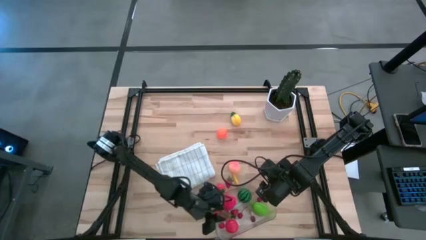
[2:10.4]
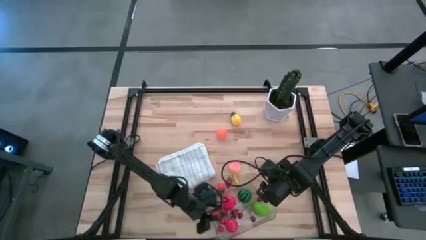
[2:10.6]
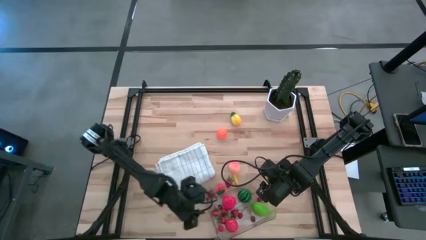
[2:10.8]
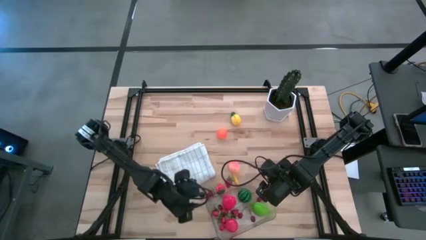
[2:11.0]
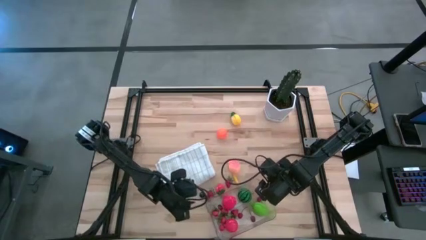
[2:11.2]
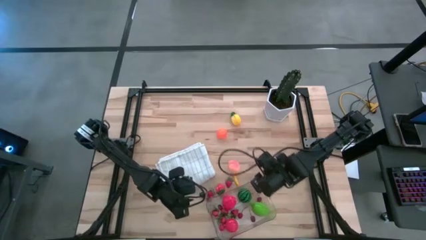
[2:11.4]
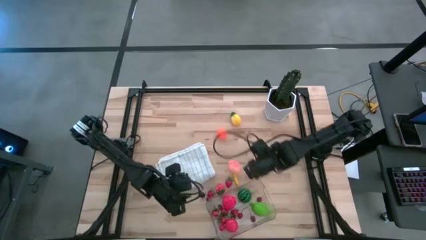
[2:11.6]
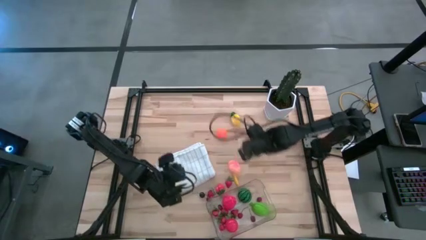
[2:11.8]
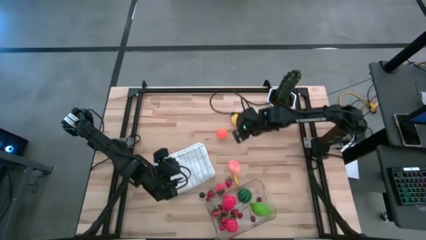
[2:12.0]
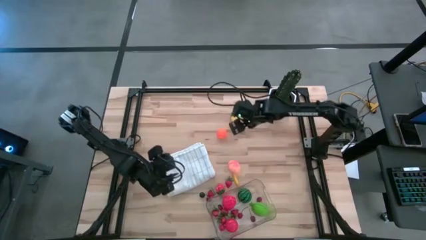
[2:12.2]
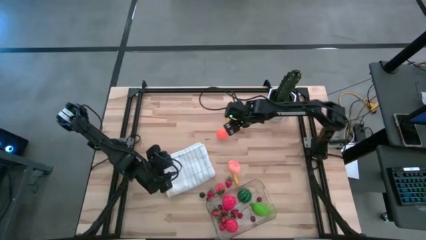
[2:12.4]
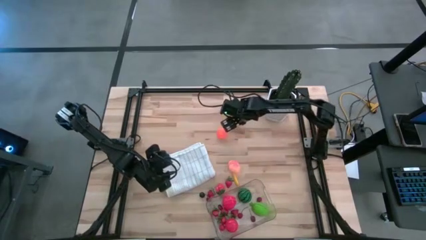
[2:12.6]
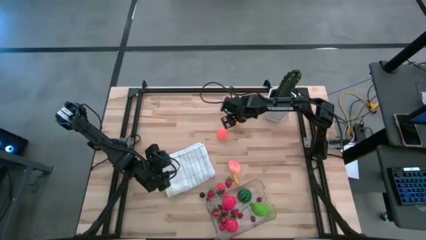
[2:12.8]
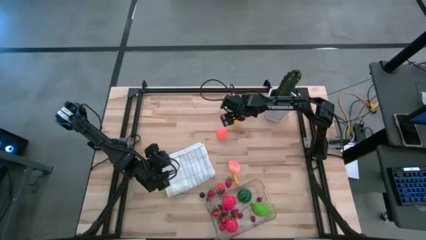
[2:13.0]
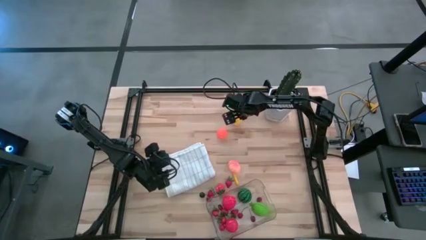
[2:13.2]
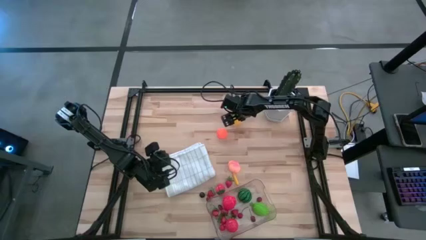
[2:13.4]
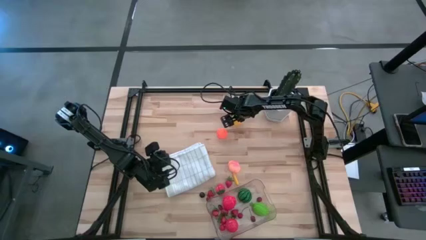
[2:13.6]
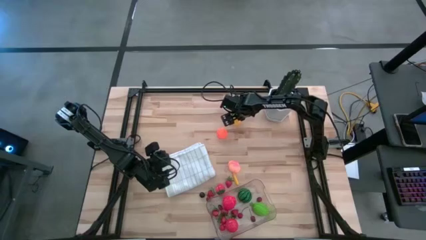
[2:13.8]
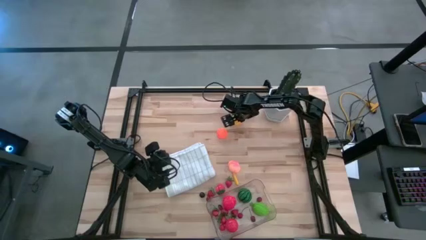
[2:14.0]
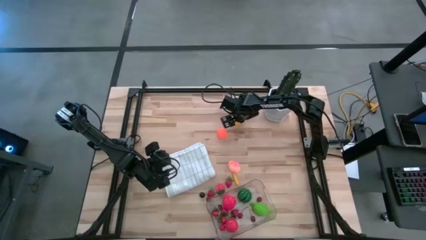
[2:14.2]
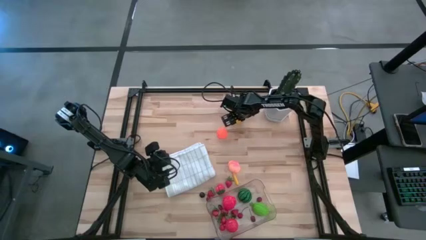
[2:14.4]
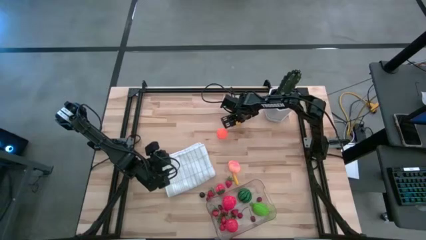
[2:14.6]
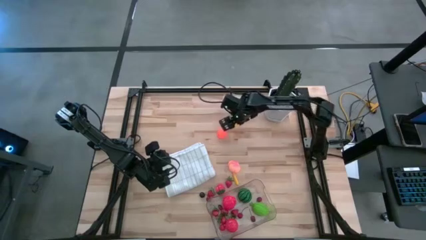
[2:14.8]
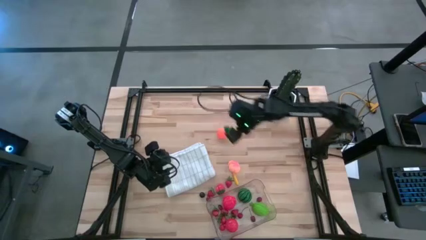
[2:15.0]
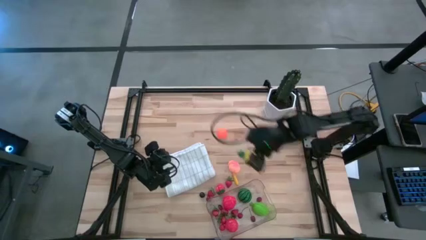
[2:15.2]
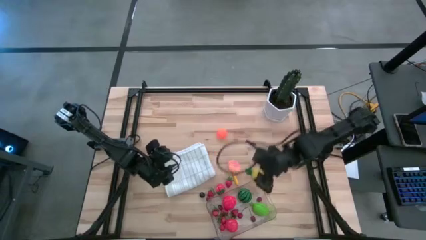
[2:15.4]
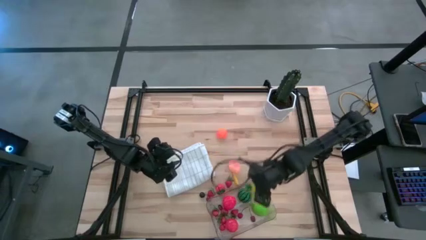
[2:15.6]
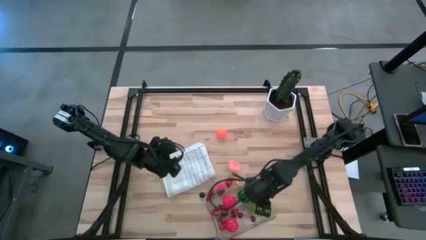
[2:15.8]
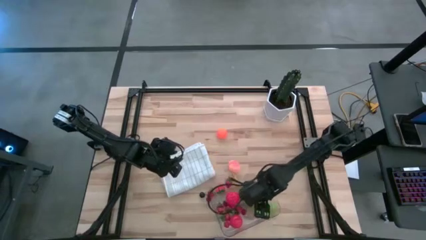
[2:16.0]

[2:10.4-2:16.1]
Task: Pick and placing Produce into tupperware
Put the pineapple into the transparent bin

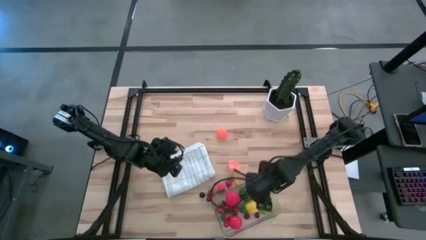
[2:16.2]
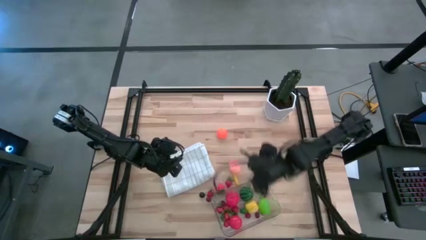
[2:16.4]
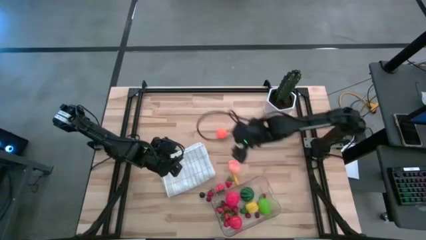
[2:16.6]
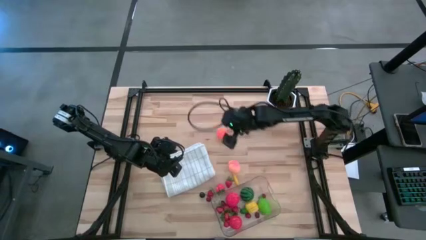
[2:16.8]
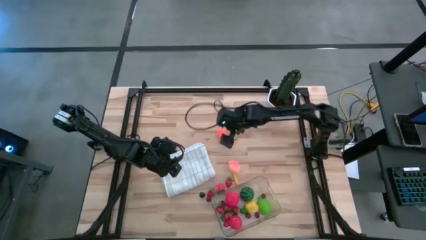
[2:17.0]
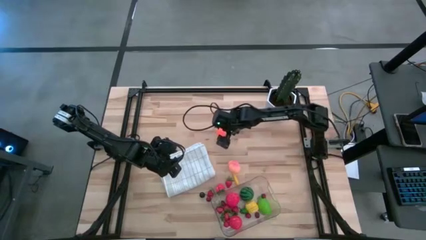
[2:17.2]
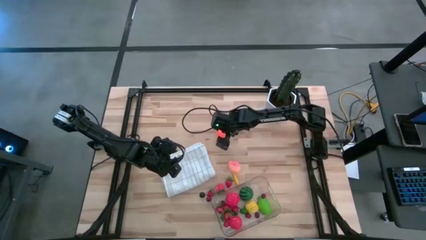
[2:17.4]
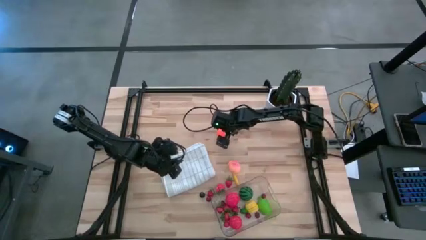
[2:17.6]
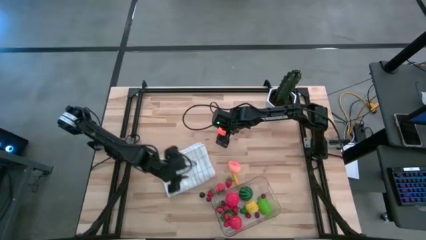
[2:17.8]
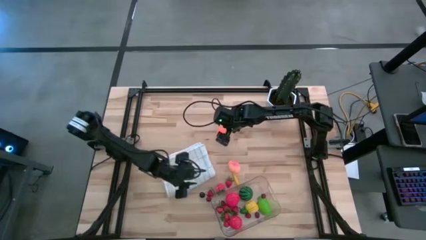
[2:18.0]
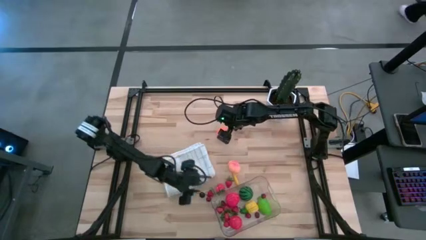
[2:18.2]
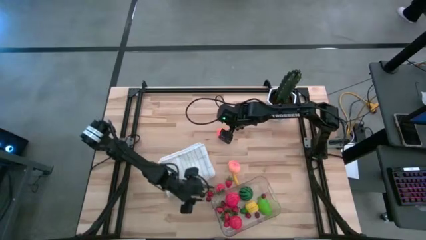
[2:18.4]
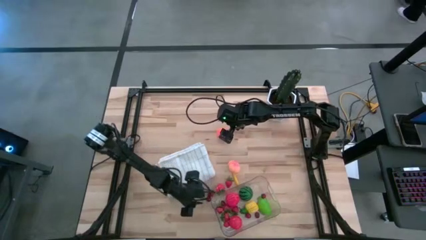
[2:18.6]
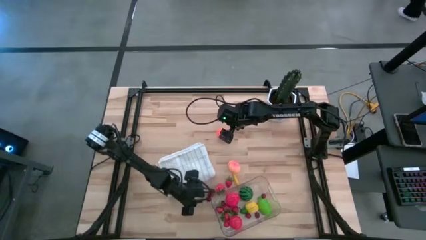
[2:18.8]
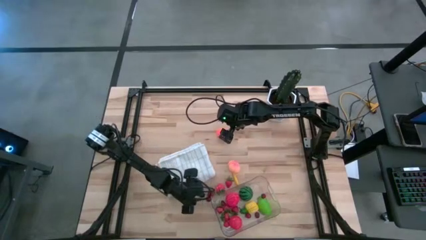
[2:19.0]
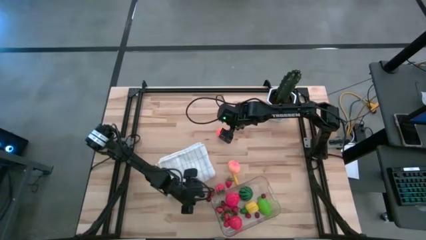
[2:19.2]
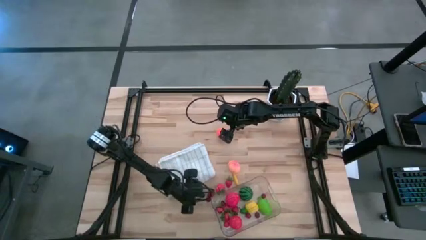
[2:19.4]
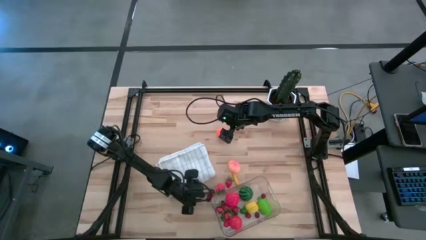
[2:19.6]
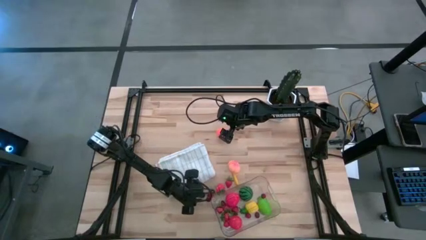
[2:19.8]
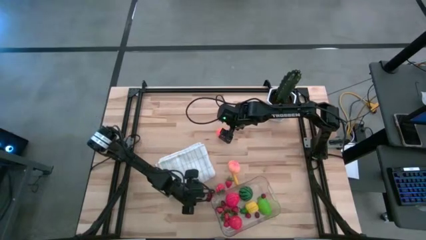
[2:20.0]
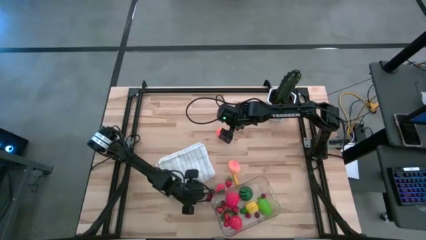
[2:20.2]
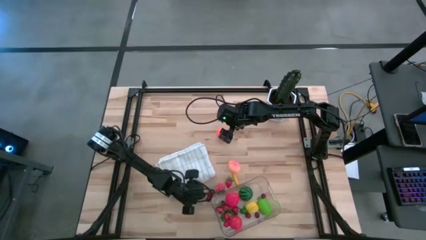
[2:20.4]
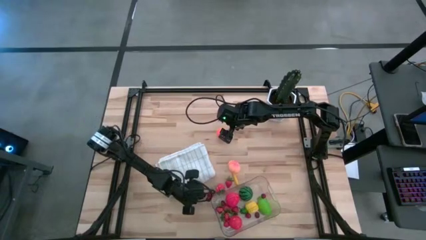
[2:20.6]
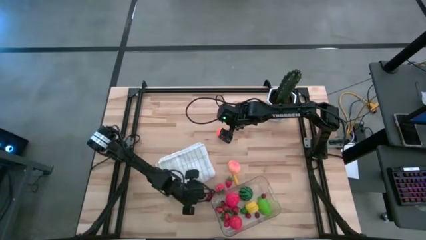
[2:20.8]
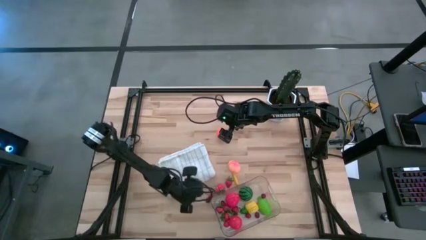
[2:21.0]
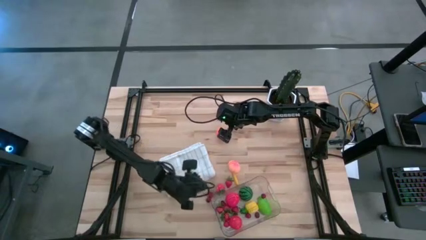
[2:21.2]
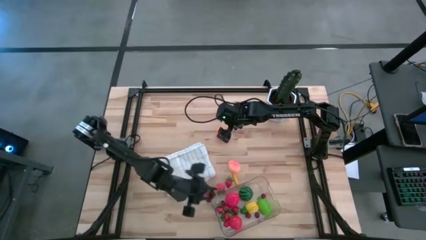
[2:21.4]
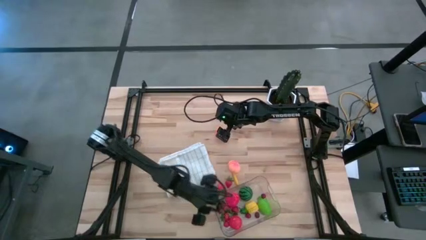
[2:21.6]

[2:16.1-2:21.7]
Put the black cherry into the transparent bin

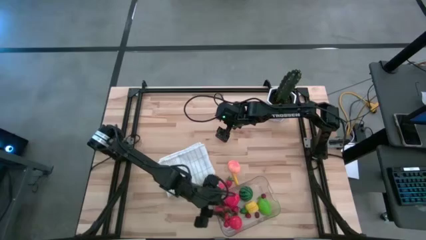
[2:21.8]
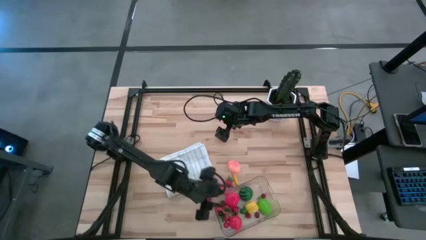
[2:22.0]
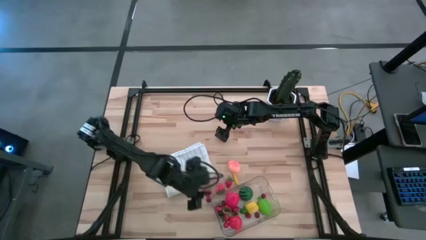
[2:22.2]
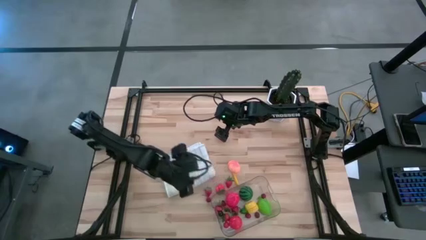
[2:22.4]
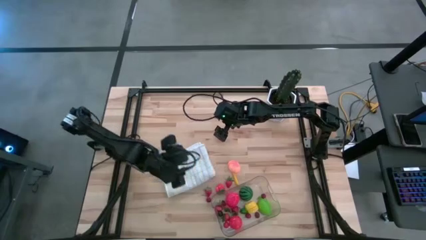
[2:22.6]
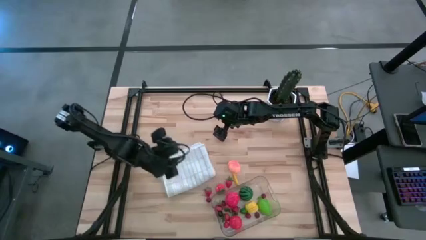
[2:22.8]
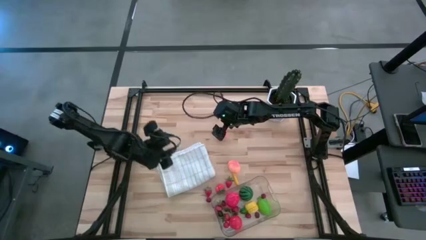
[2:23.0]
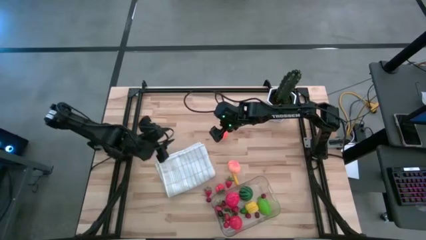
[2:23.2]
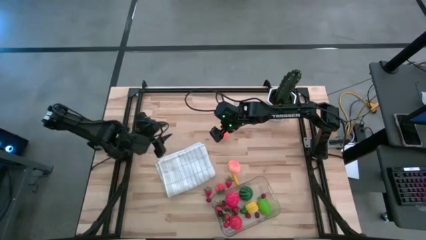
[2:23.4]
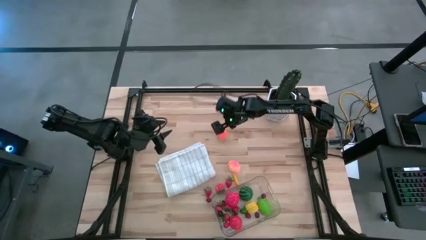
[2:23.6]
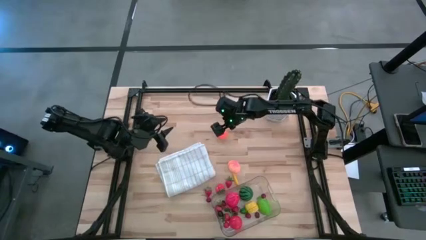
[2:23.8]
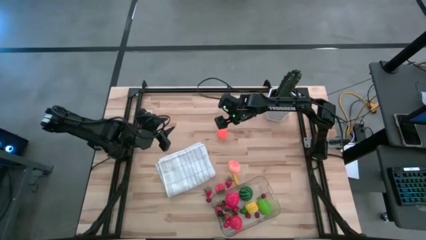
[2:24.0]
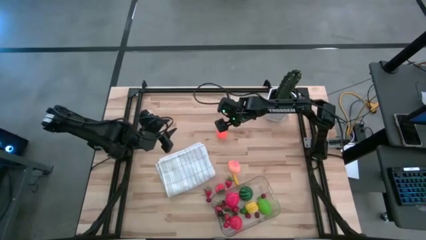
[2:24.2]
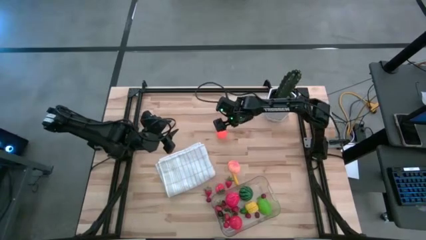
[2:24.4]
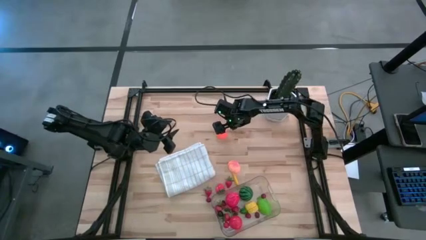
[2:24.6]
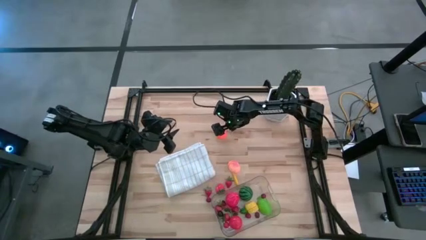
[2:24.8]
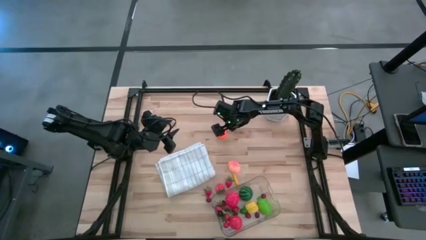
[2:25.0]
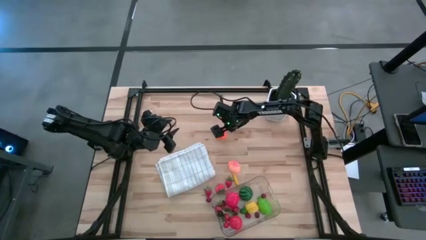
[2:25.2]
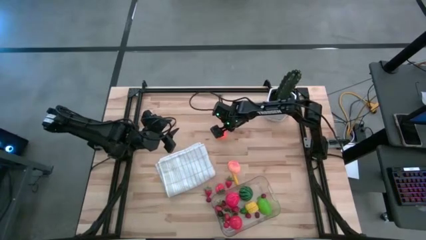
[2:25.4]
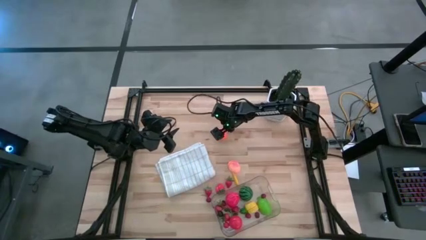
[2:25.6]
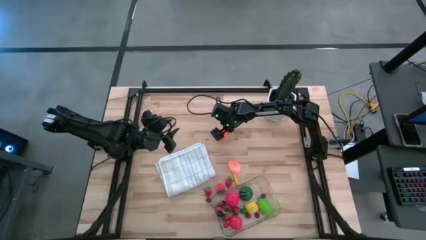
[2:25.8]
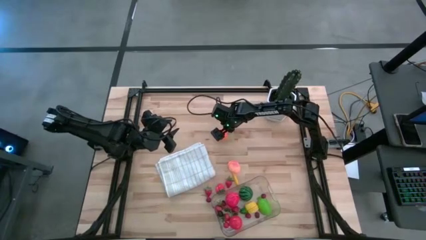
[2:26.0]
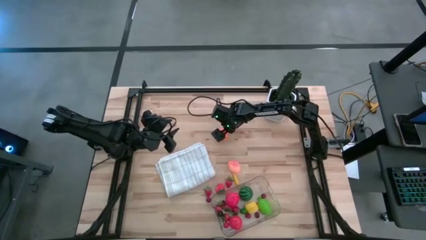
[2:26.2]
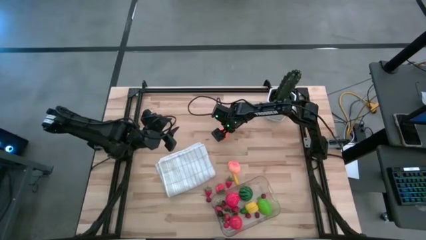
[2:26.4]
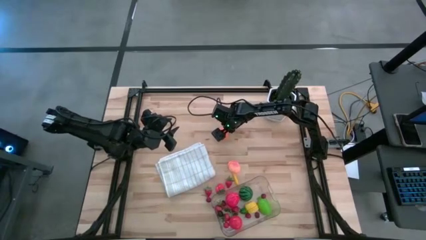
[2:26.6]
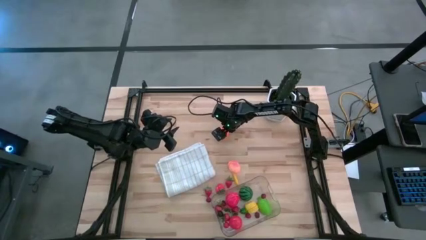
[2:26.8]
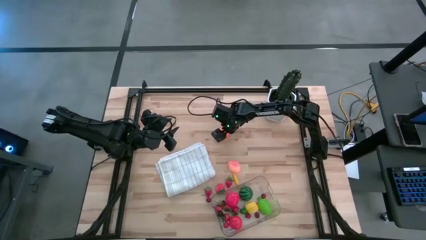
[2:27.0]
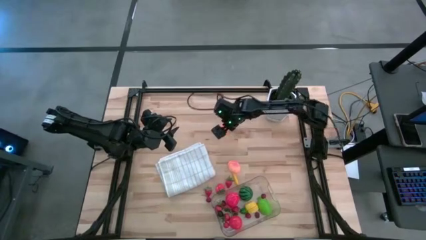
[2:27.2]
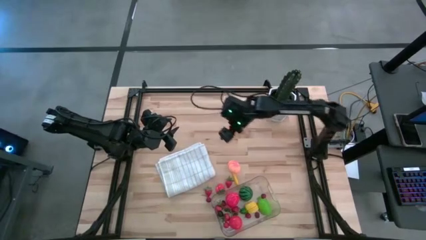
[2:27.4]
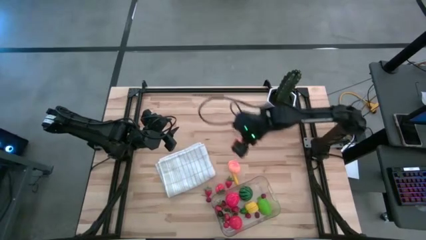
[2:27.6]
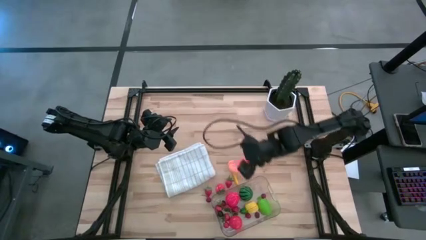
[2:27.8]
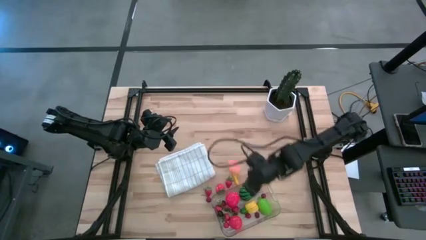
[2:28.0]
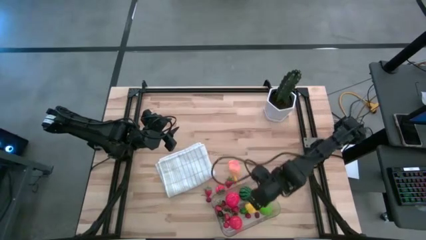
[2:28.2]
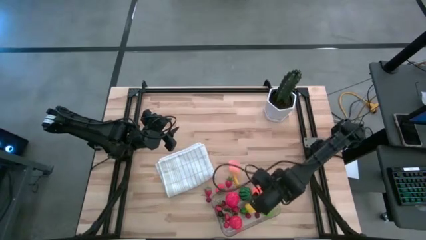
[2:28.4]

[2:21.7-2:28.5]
Put the pumpkin into the transparent bin
